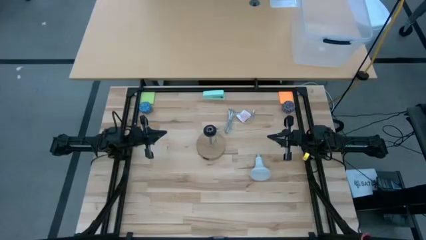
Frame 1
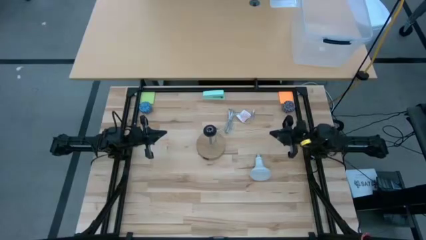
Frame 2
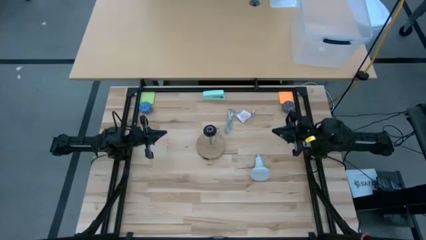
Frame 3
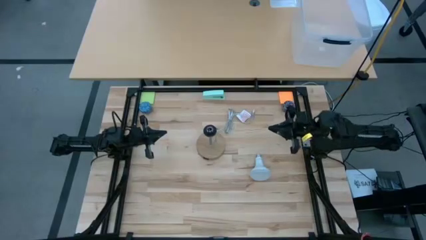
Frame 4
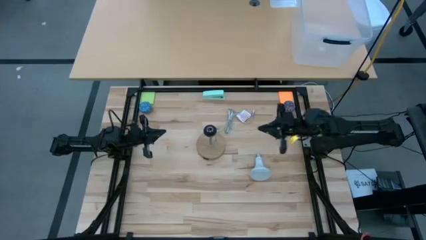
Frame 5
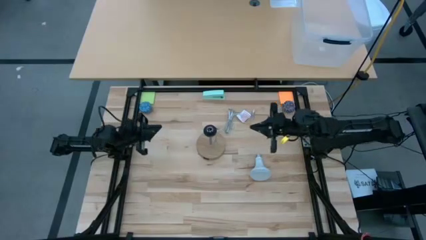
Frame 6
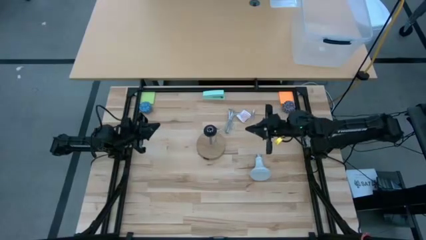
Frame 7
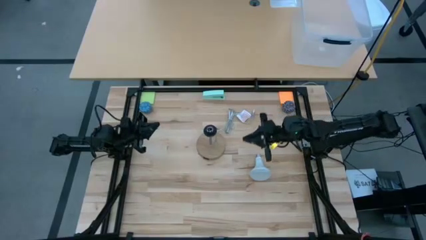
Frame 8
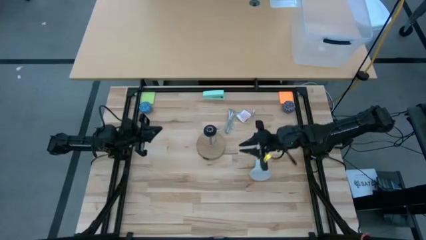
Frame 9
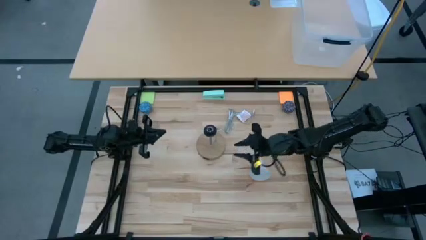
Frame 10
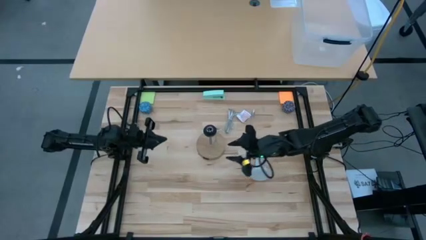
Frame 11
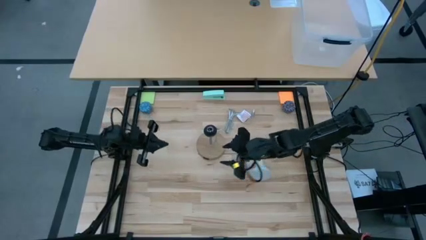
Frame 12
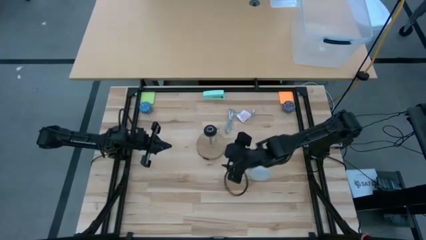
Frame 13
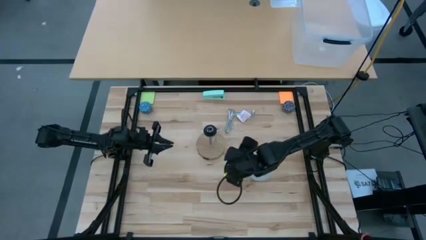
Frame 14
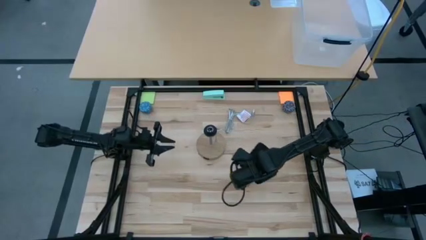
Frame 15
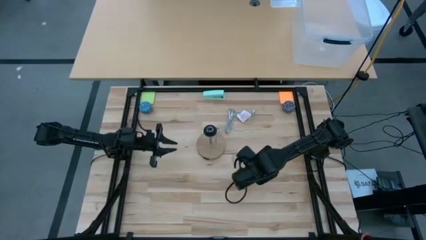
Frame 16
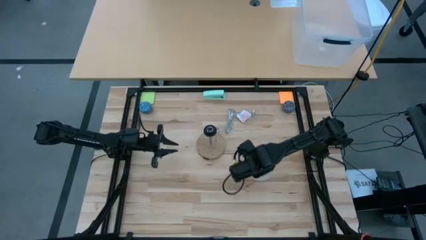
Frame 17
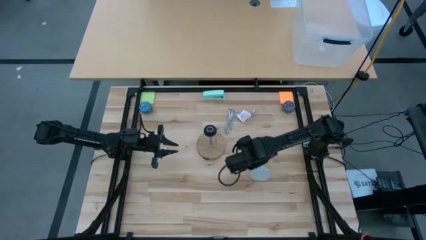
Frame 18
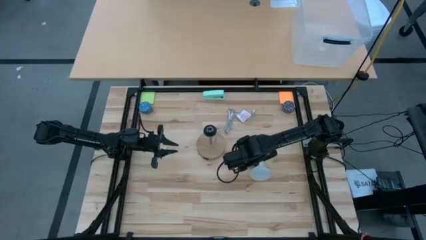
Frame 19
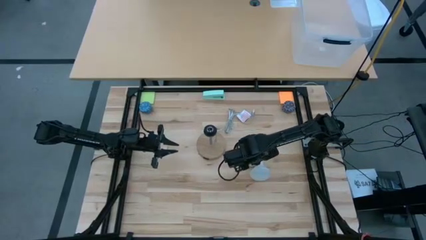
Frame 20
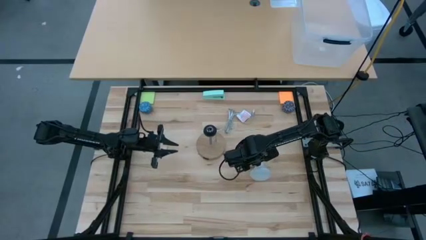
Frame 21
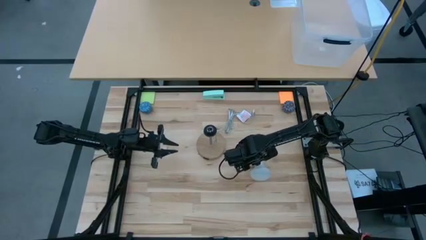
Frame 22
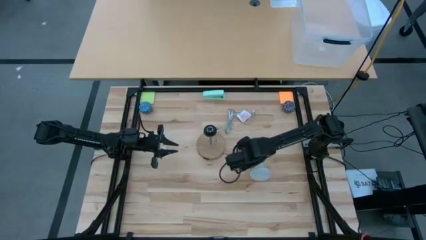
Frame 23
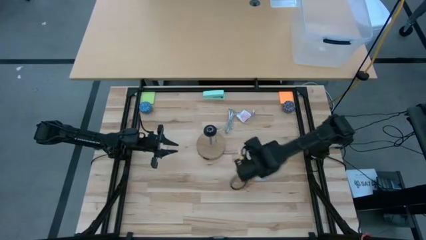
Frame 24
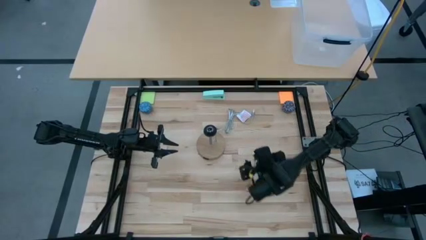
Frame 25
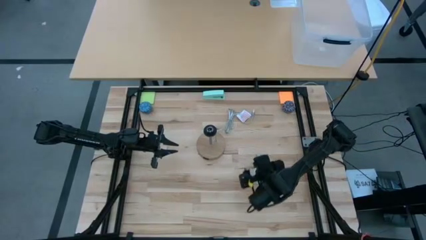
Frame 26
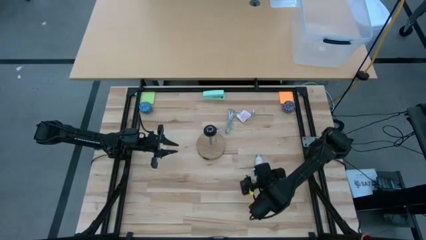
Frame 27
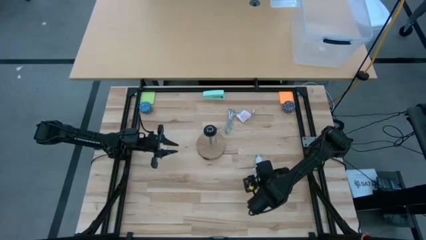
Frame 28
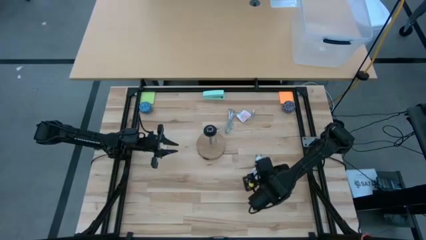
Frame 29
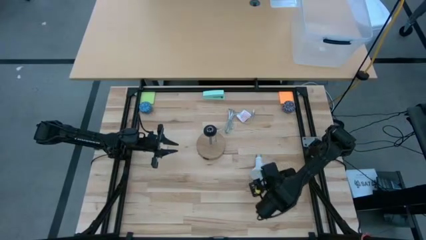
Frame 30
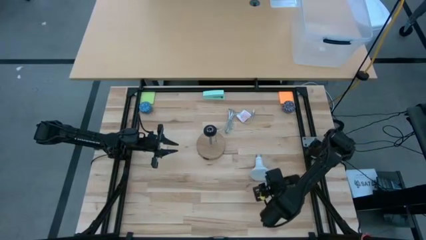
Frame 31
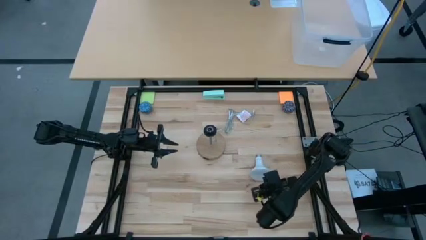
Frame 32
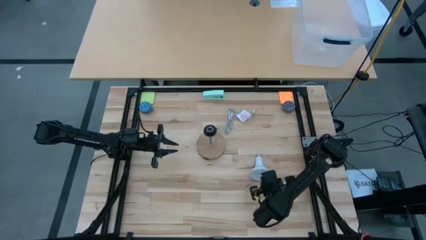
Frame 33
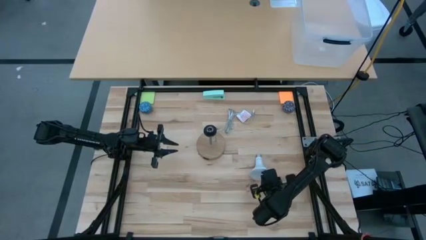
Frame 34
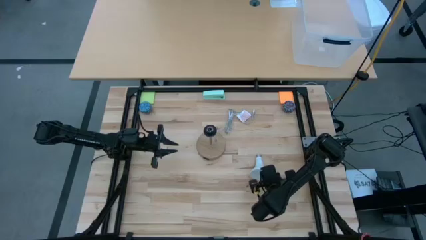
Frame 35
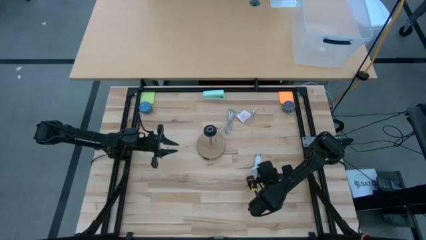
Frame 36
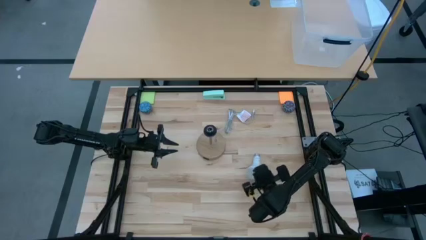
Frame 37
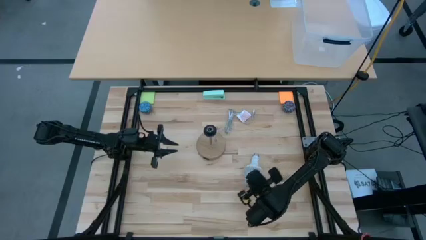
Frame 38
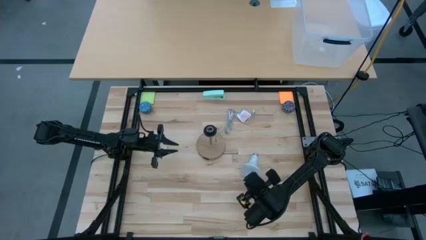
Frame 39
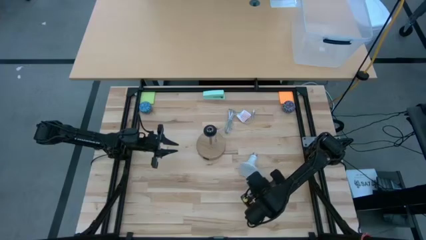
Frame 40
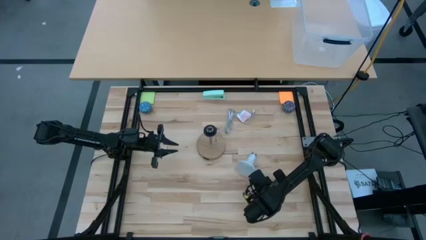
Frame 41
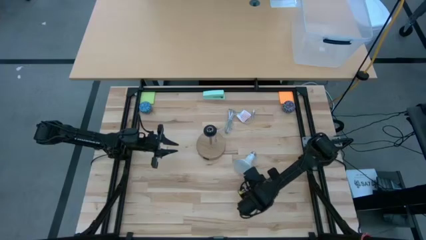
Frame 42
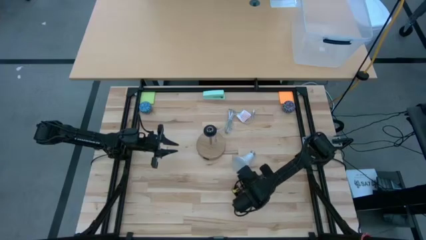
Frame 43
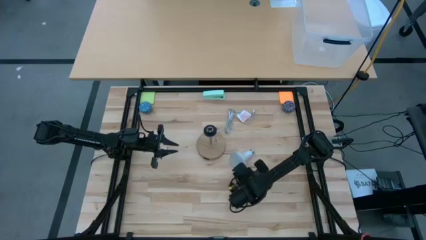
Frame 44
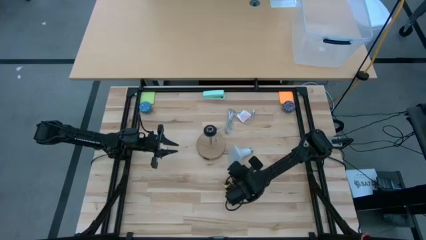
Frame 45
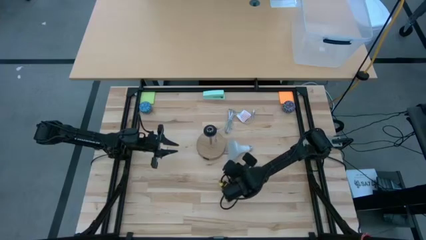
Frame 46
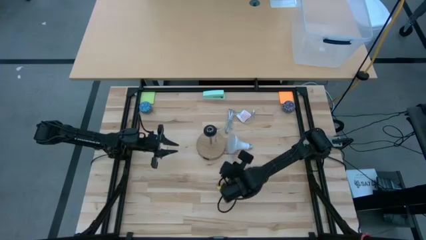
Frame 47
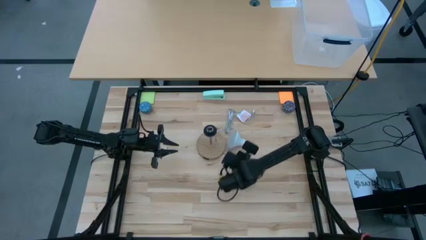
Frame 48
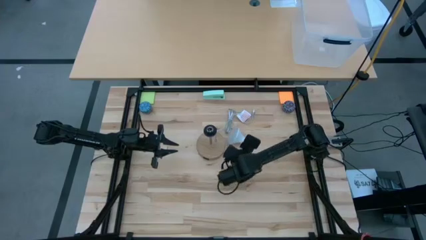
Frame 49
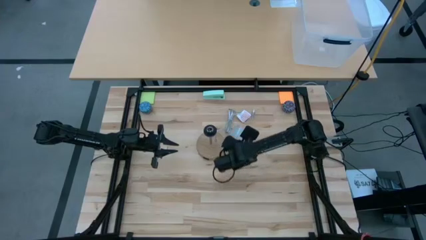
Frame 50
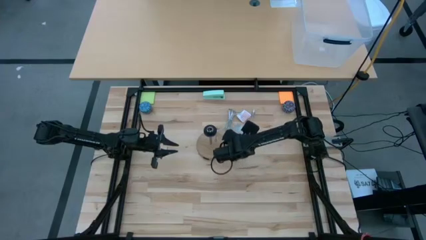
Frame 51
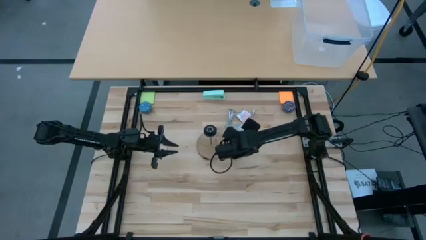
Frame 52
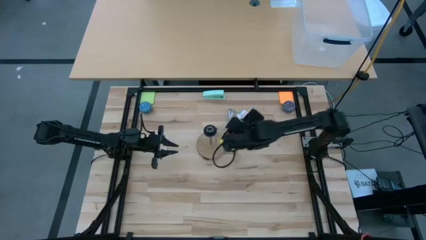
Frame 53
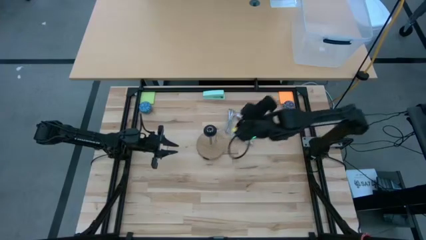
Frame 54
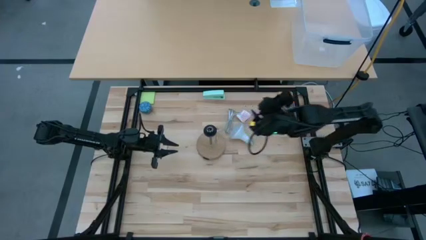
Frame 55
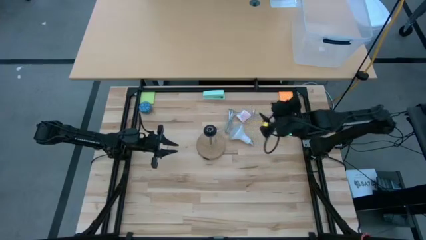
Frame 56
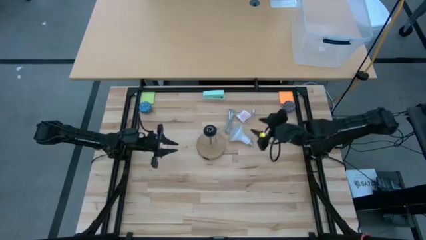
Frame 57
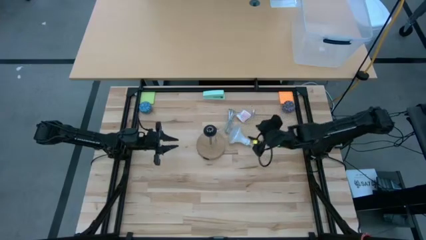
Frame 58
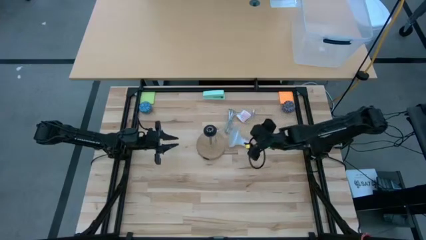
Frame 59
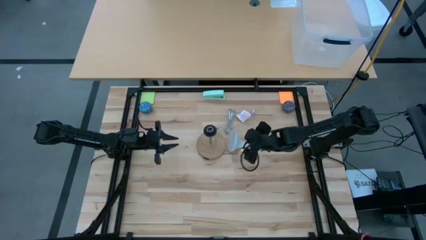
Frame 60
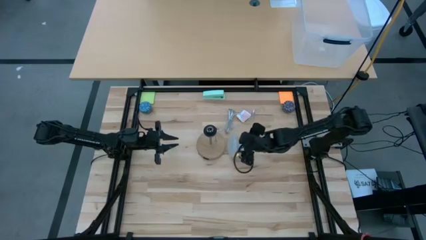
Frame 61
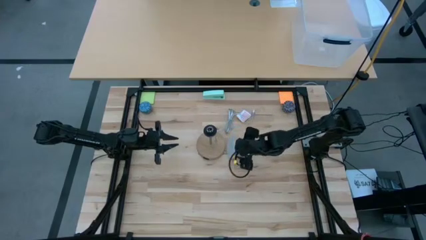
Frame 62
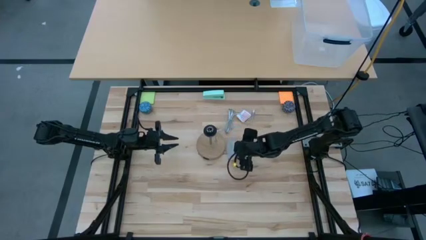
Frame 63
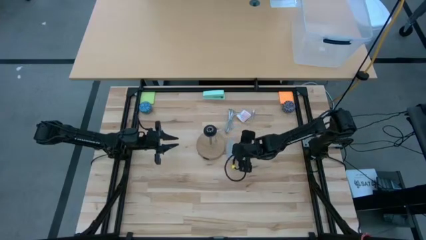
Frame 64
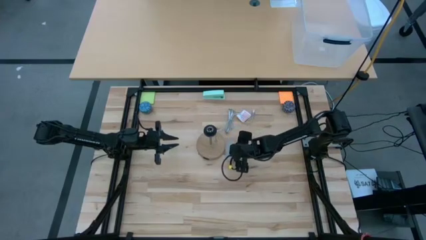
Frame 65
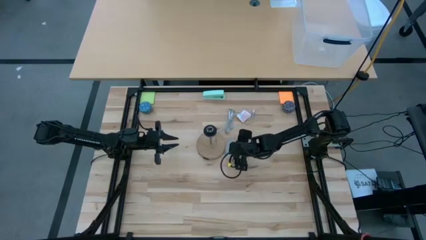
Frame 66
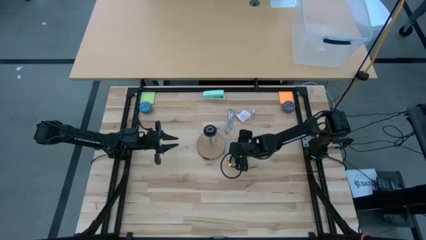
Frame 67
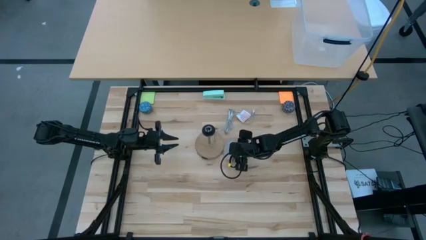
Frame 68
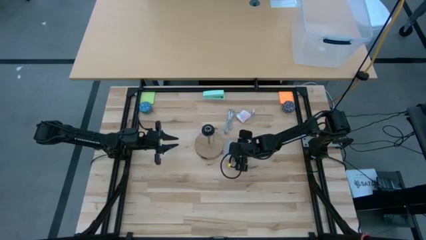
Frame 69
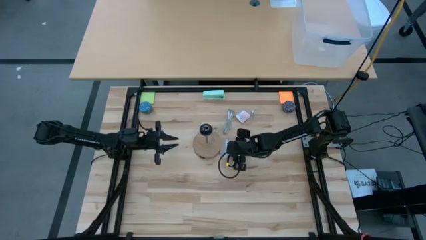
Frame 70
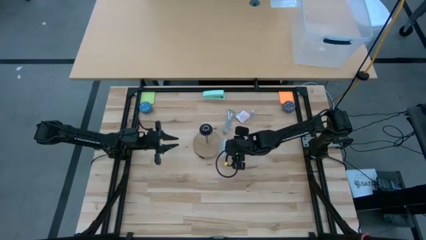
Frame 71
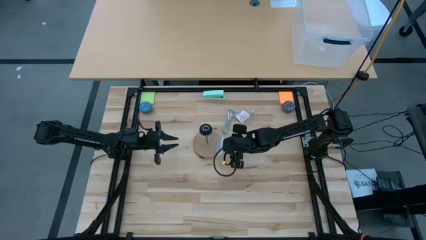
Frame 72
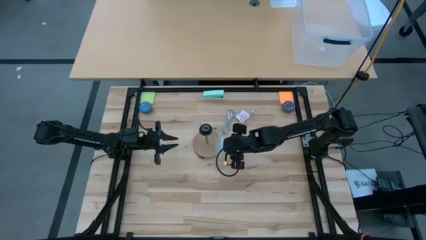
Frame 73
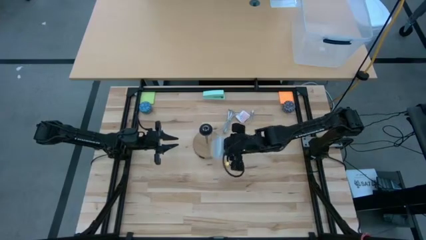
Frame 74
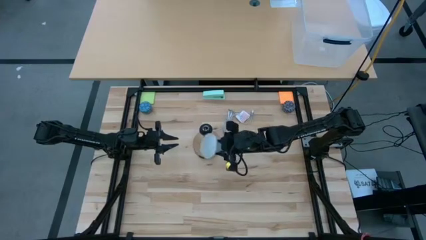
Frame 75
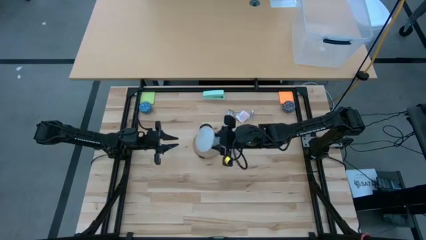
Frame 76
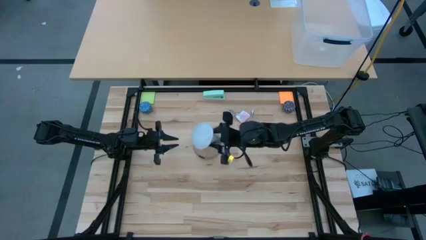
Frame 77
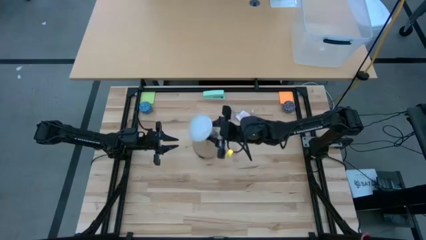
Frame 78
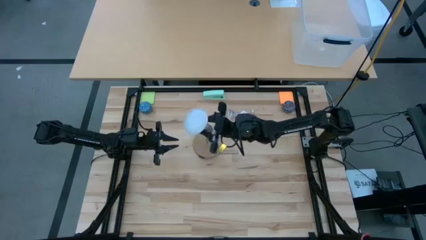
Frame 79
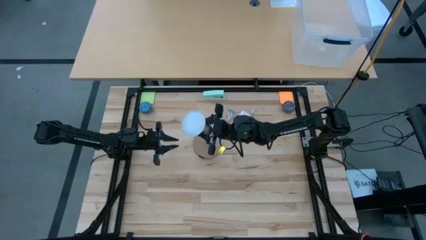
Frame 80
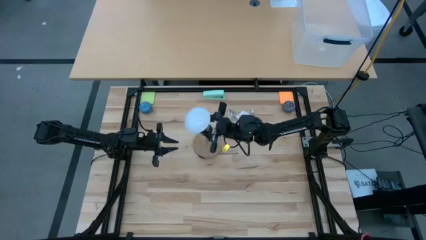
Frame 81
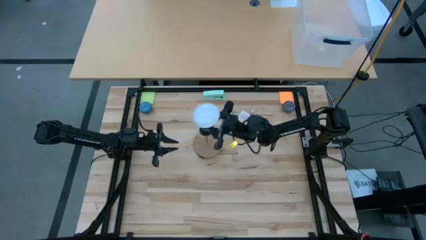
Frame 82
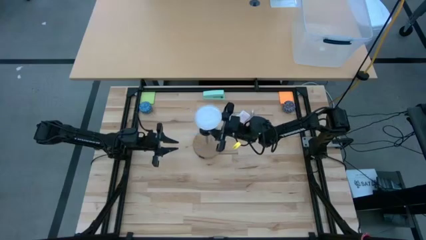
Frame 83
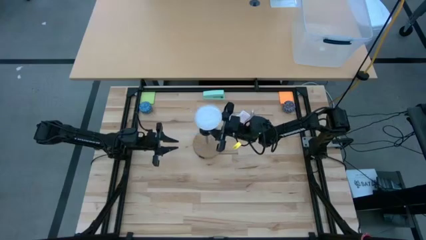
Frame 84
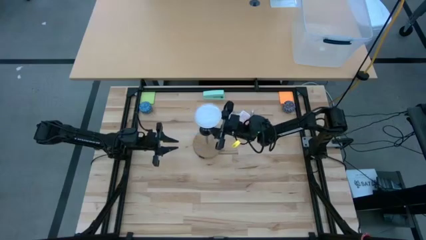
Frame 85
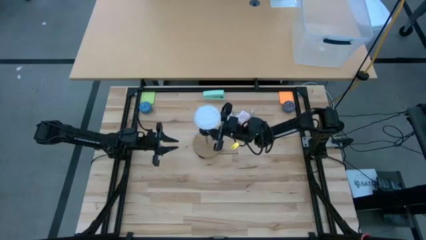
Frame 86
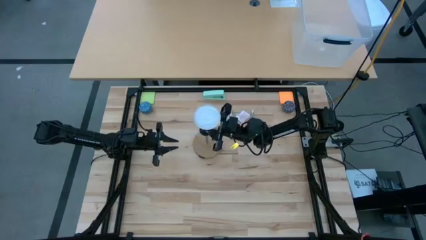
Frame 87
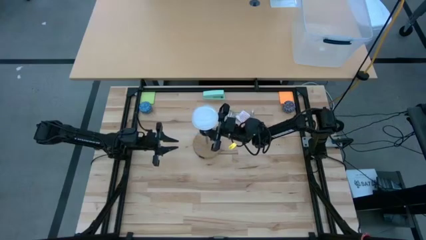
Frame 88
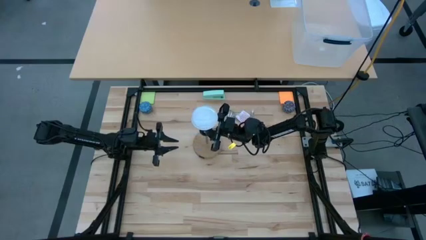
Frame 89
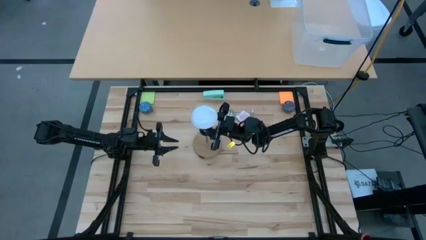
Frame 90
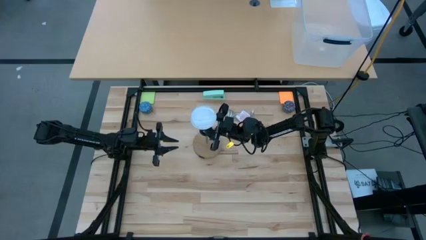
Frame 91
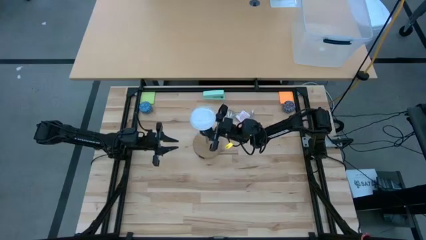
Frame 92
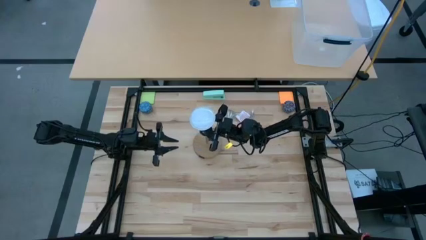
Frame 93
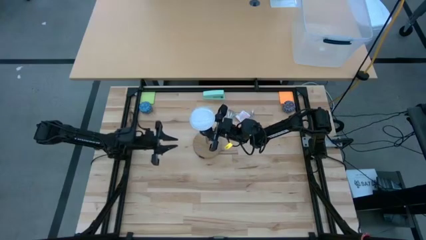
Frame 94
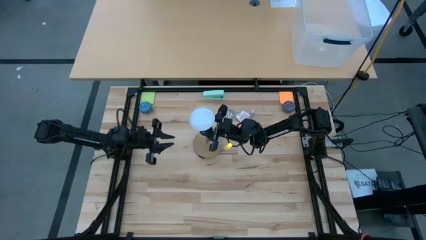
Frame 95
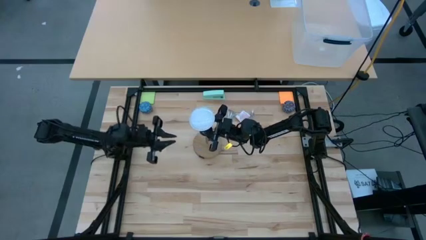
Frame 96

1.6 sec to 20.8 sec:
Task: Screw lightbulb
Insert the lightbulb into the lamp socket
